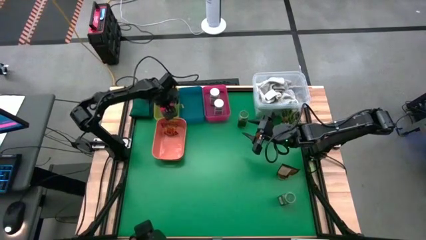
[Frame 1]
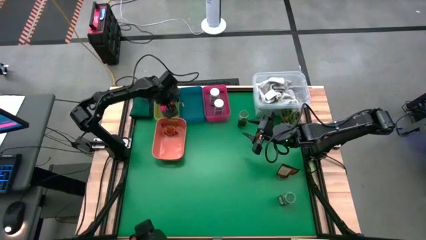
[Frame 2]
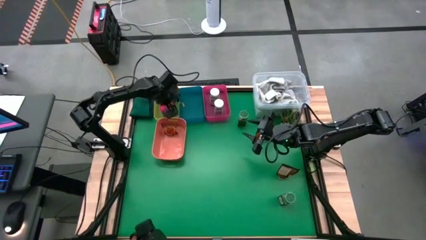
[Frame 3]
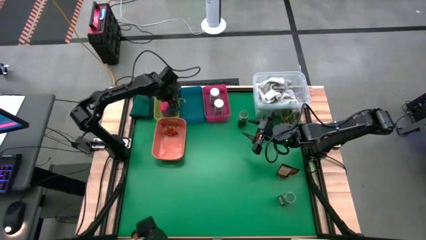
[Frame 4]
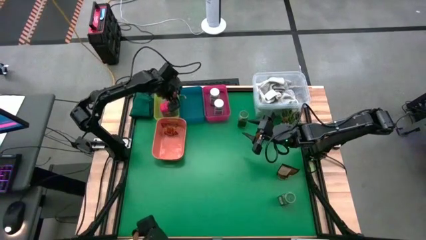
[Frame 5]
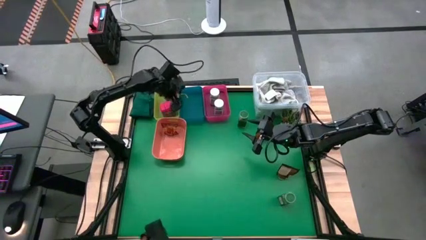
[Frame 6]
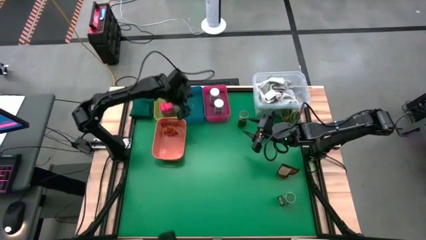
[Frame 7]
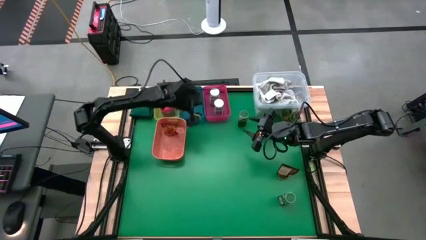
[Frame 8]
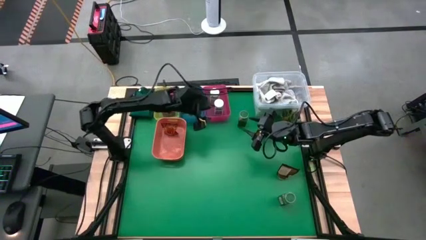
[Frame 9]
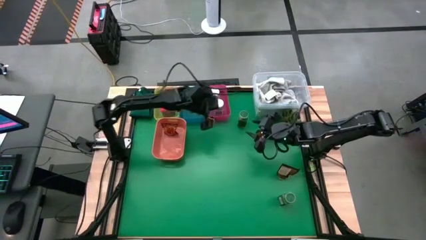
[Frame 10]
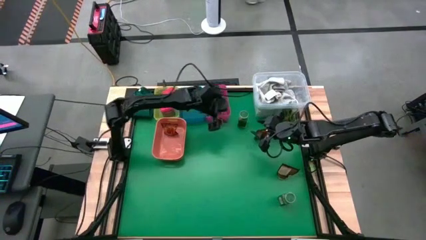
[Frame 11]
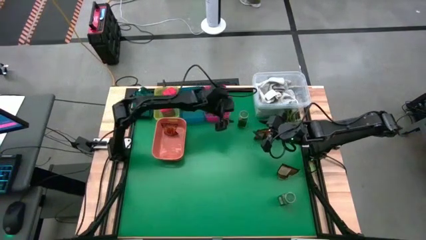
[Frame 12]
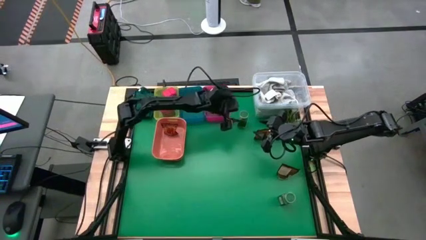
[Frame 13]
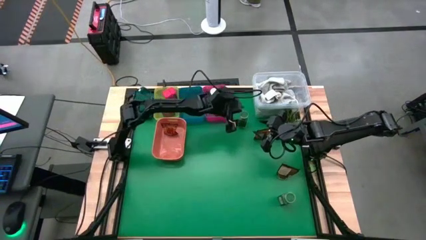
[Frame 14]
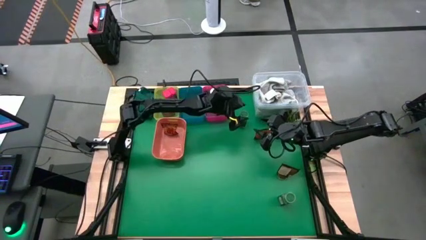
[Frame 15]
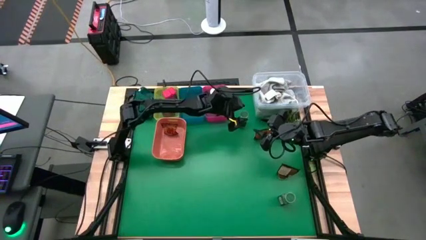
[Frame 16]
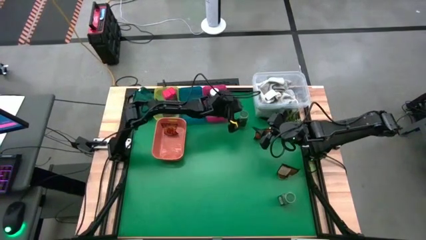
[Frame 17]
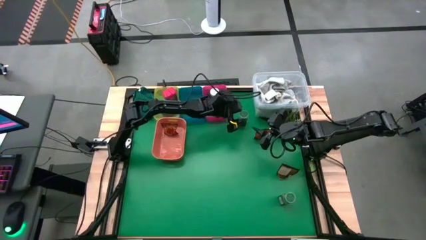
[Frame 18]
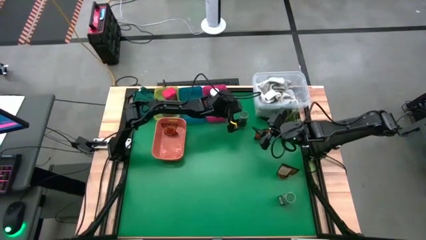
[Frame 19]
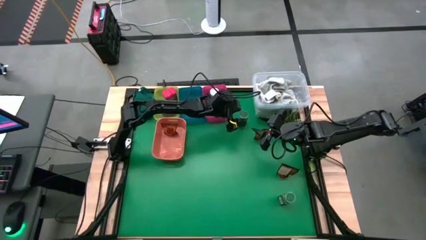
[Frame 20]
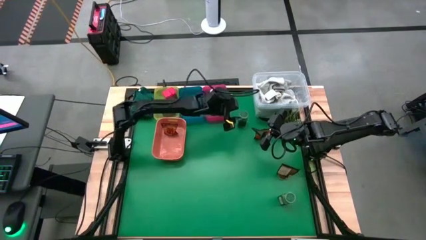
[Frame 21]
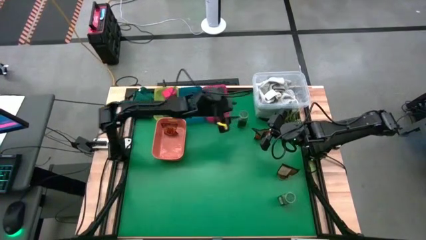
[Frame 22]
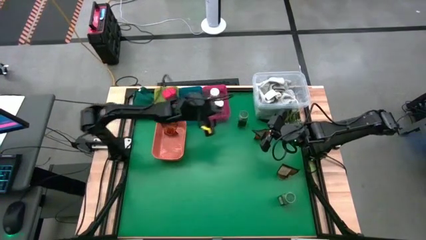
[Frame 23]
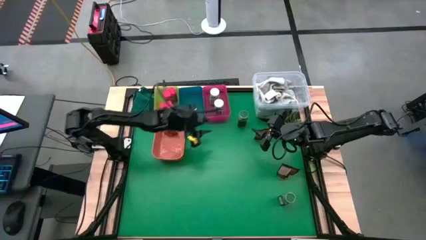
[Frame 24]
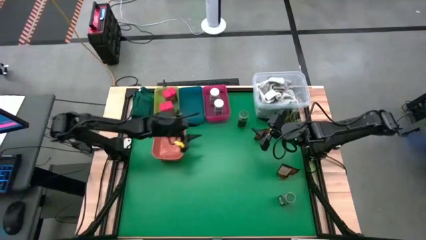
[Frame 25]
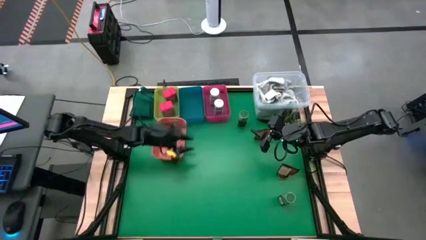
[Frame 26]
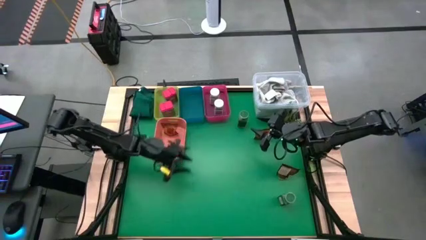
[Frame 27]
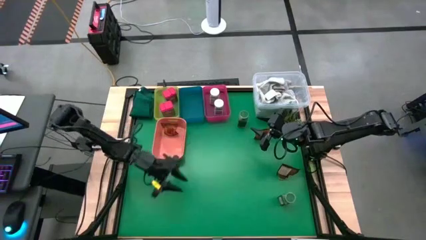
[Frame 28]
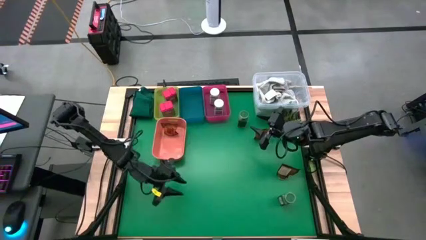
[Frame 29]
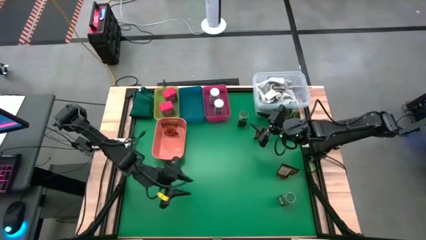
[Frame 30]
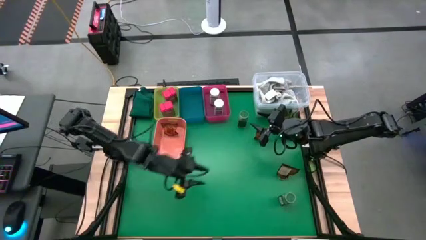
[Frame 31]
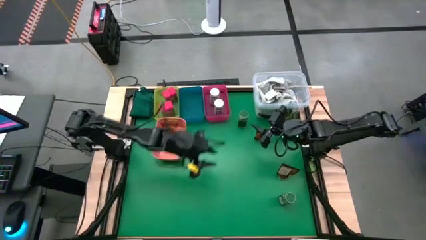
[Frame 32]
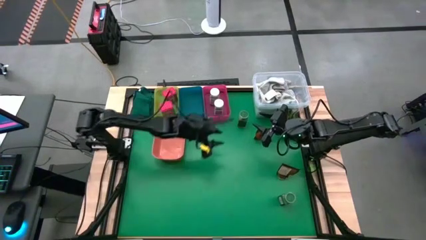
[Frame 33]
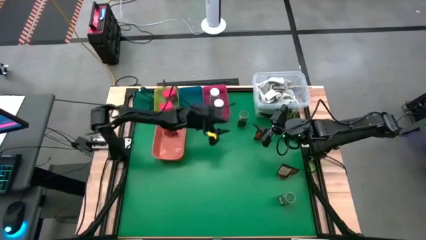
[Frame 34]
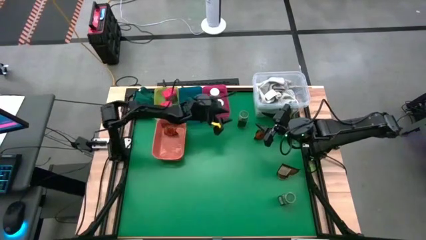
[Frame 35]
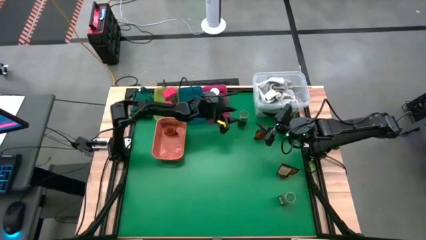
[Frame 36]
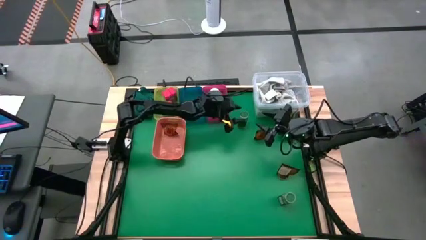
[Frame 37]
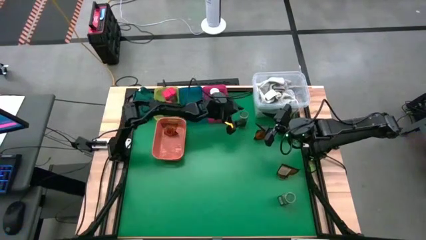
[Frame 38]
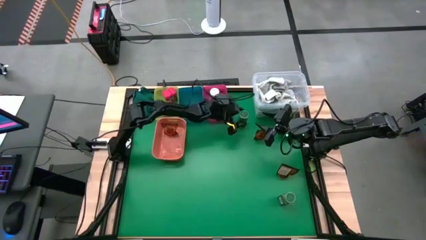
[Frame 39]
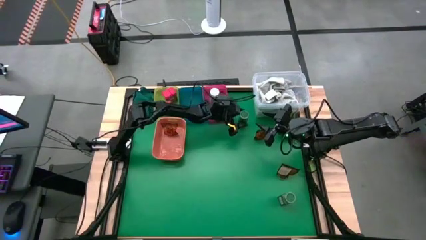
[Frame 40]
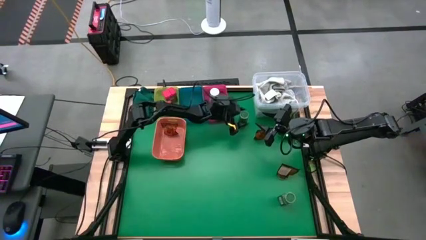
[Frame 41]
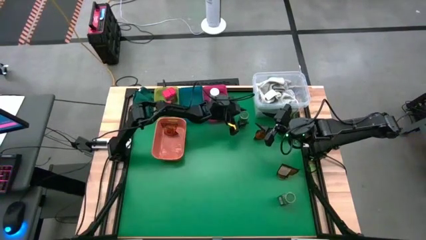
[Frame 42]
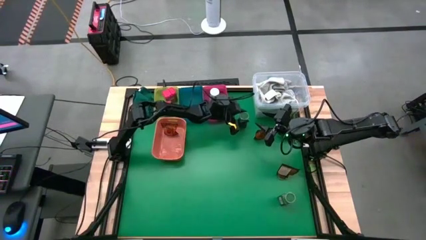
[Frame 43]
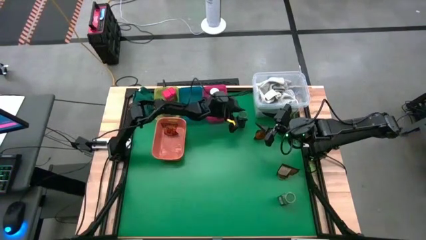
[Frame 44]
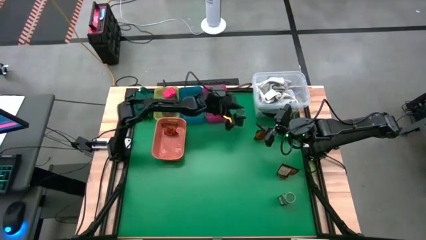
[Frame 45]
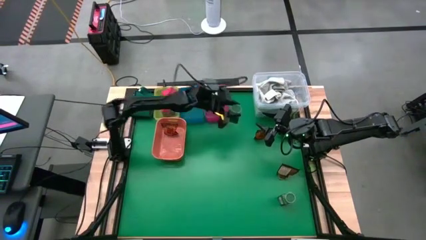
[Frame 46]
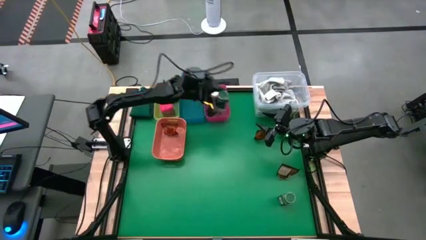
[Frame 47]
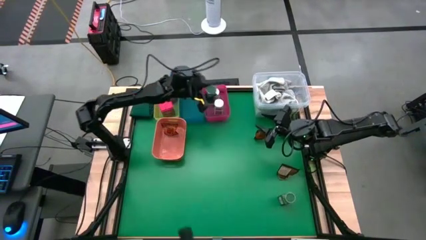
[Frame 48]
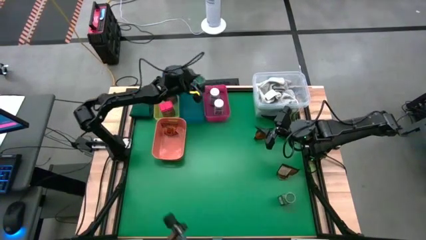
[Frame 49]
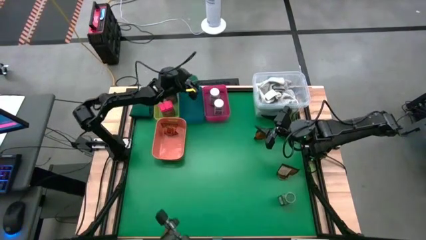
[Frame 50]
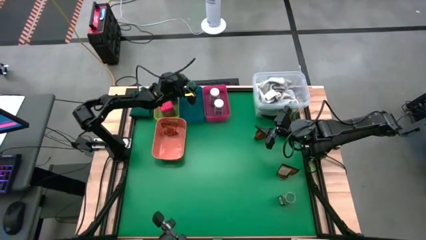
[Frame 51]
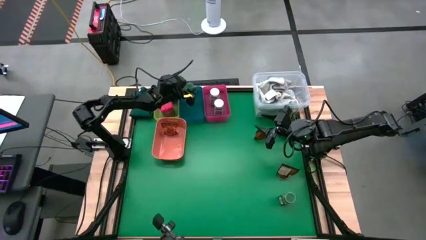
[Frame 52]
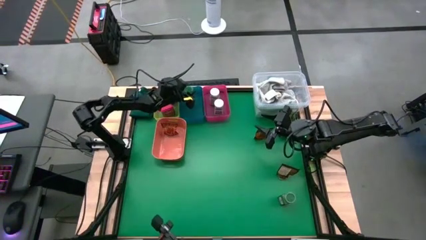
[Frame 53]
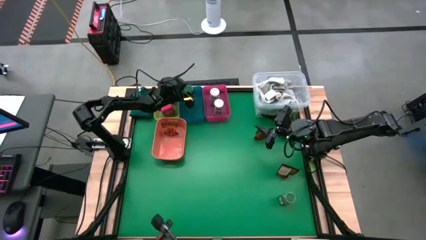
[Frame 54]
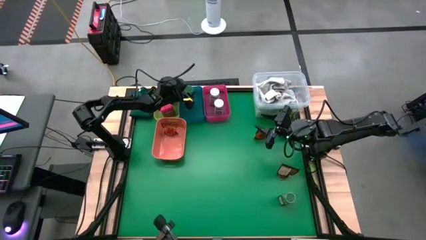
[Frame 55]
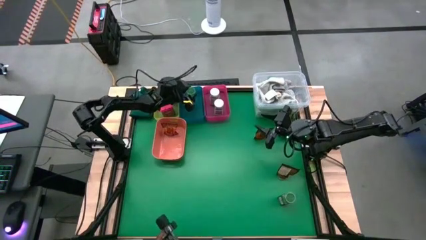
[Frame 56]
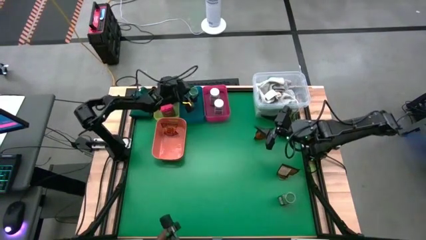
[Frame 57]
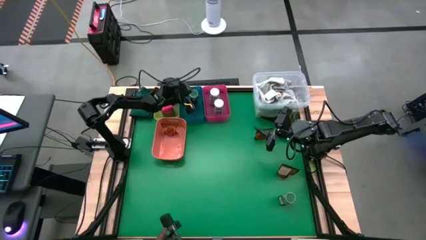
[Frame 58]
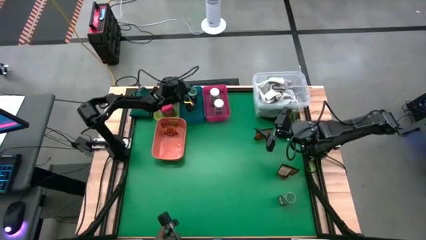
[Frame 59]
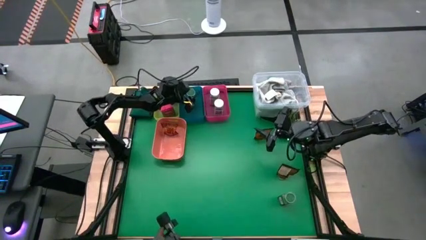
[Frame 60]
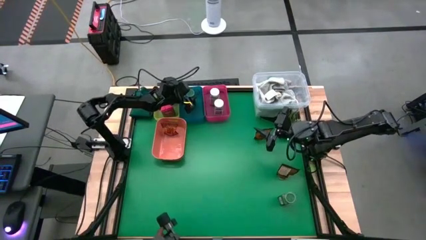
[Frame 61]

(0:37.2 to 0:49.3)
Task: Sort spices by type
Put the top green seasoning bottle into the blue bin

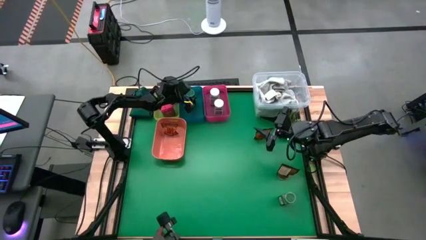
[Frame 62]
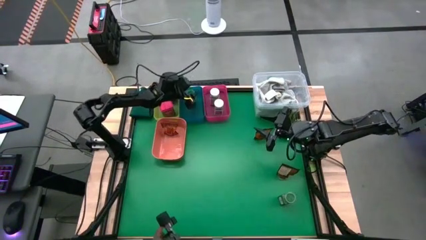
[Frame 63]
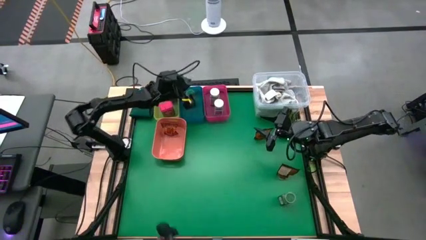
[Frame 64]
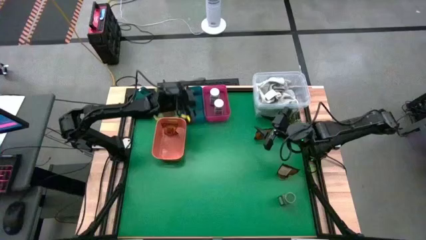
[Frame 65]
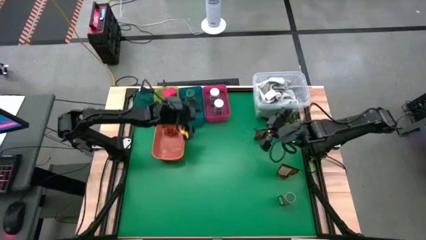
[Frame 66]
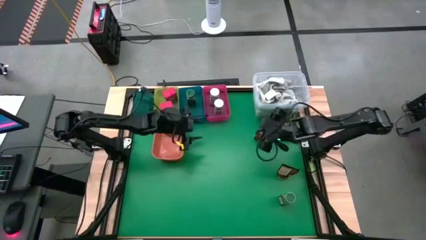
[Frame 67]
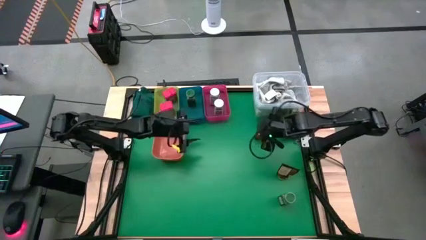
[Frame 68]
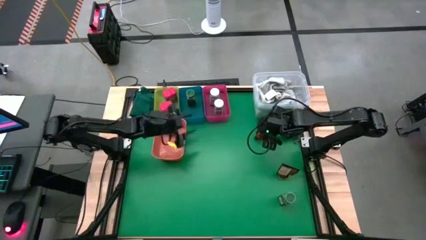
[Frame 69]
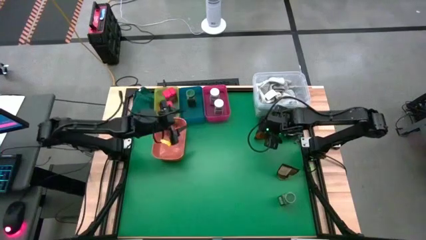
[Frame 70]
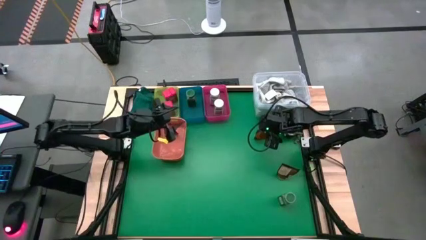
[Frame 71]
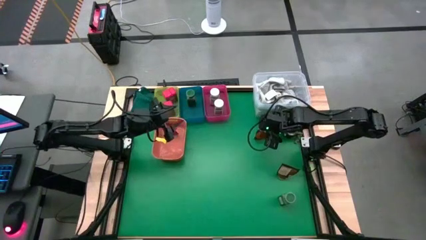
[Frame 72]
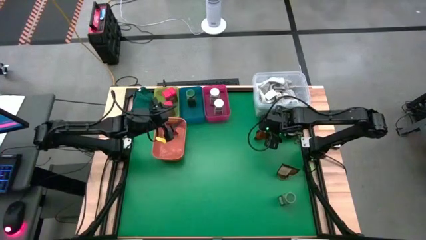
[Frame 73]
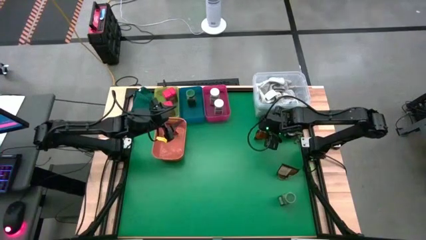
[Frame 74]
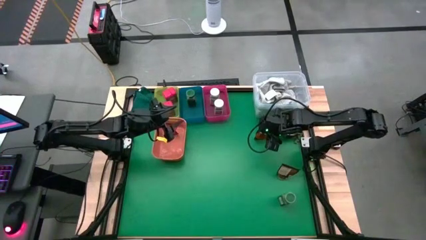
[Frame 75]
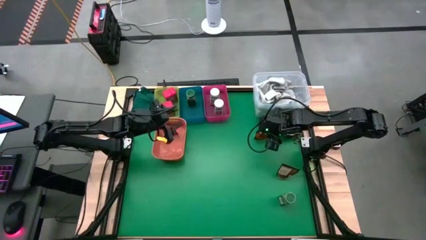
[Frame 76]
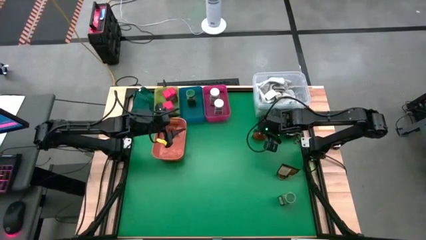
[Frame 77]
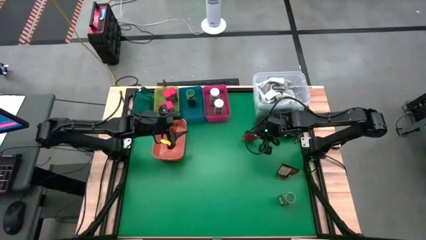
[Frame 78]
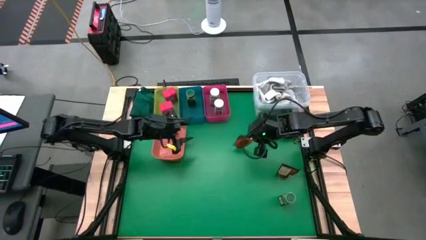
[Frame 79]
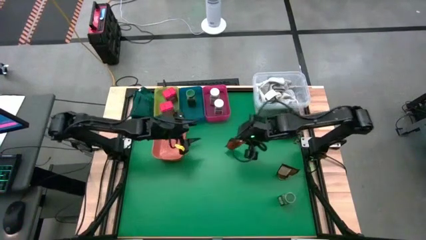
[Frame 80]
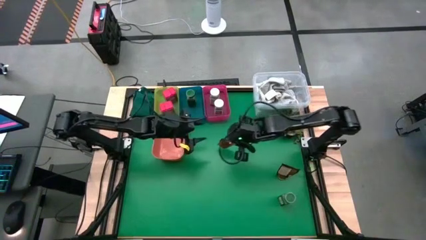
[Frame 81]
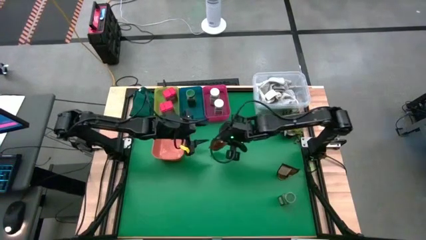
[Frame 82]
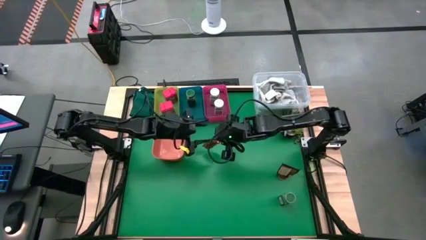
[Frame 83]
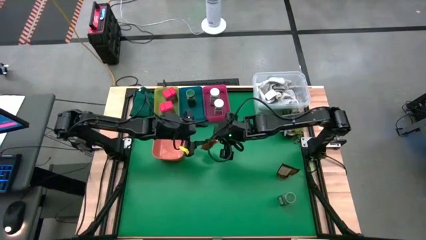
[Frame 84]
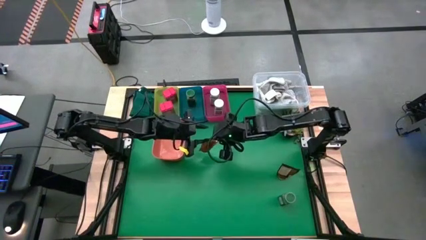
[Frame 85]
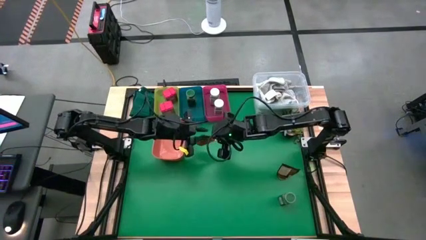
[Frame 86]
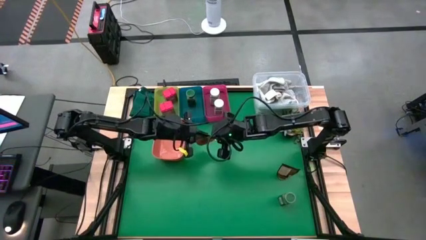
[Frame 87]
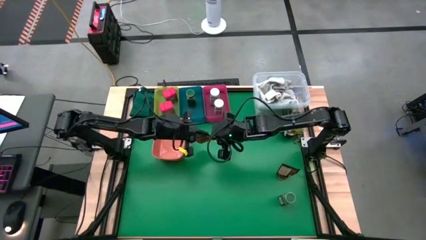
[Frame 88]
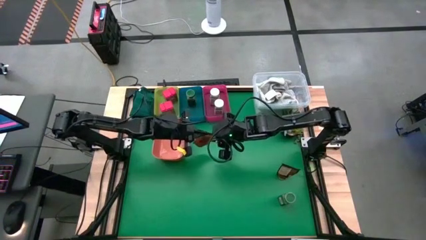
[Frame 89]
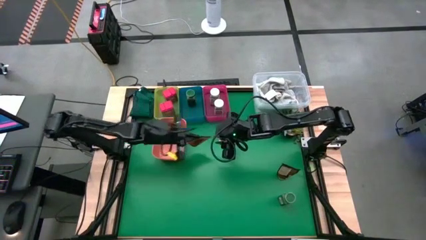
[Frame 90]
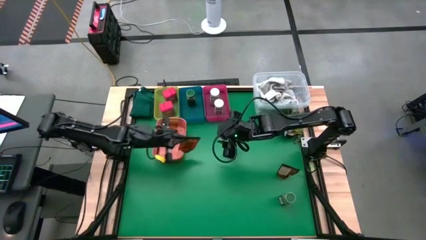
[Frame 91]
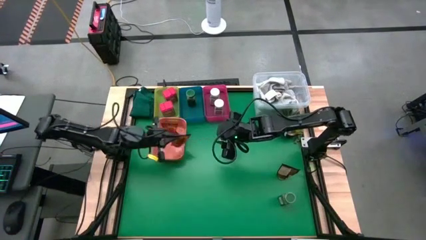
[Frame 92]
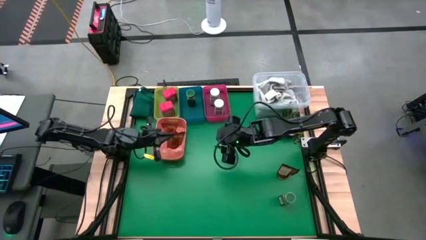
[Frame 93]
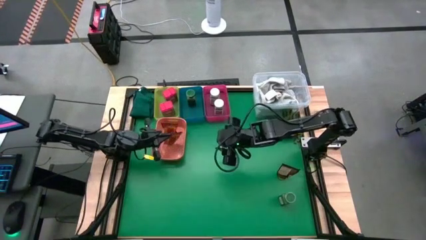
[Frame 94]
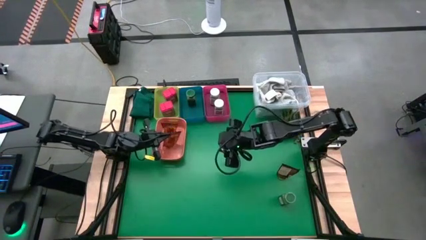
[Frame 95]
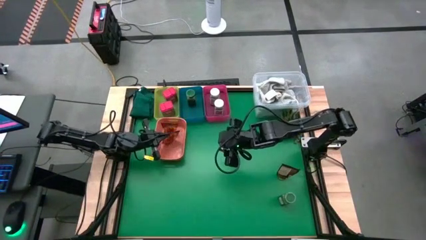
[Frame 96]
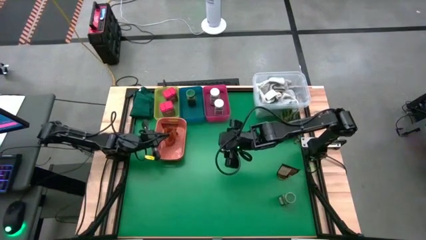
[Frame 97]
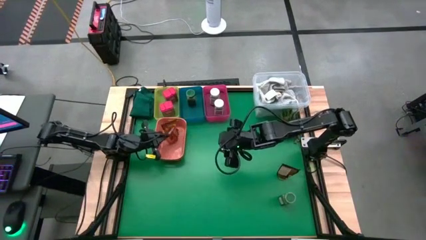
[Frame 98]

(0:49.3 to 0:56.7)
Put the top brown seasoning bag into the orange bin
